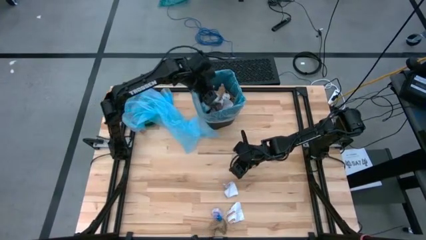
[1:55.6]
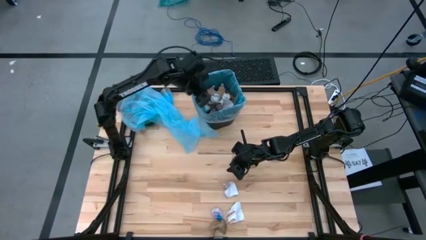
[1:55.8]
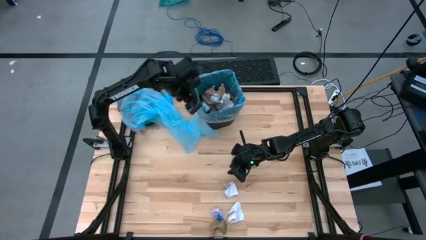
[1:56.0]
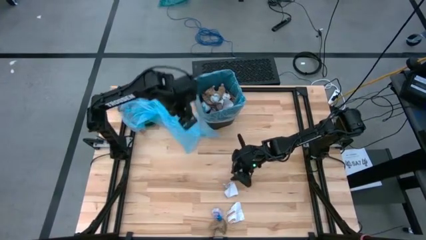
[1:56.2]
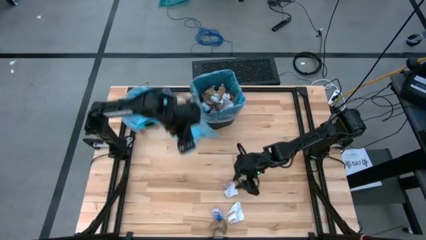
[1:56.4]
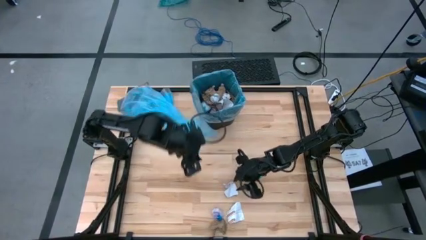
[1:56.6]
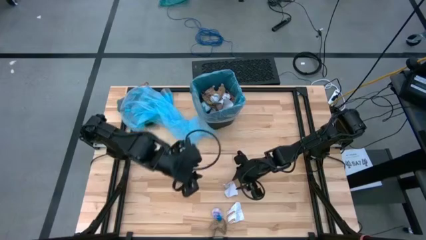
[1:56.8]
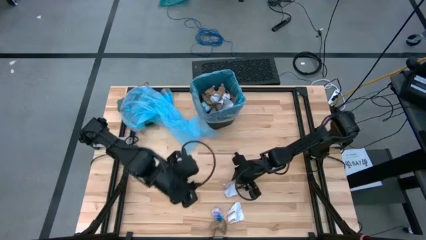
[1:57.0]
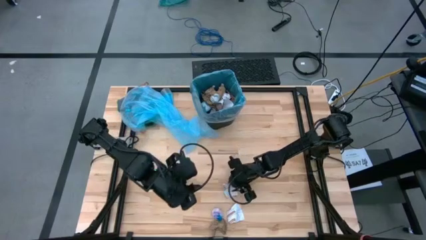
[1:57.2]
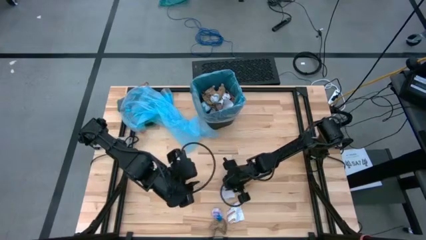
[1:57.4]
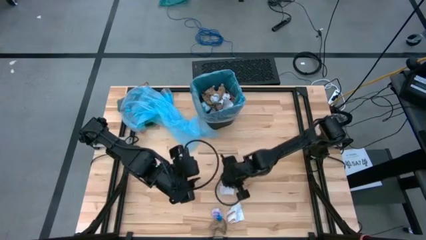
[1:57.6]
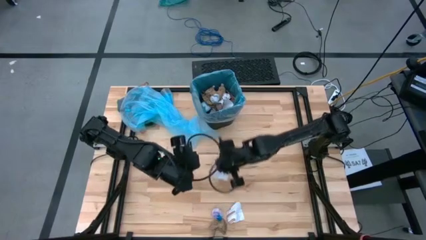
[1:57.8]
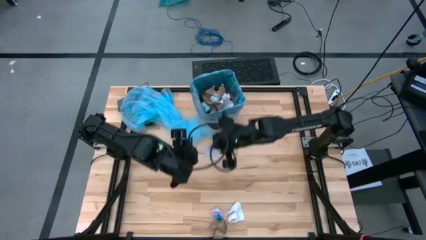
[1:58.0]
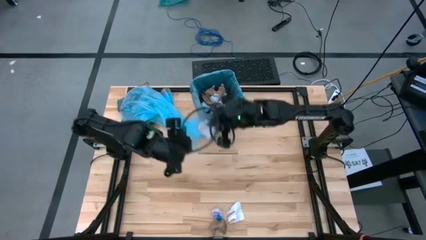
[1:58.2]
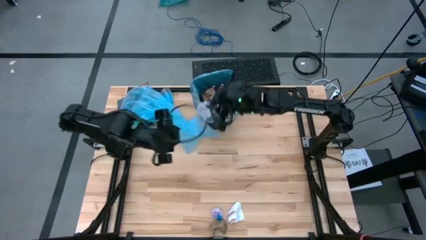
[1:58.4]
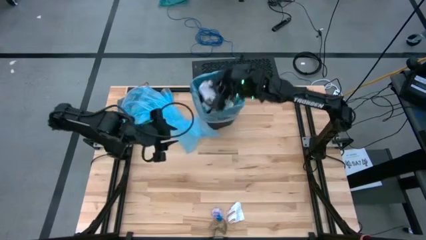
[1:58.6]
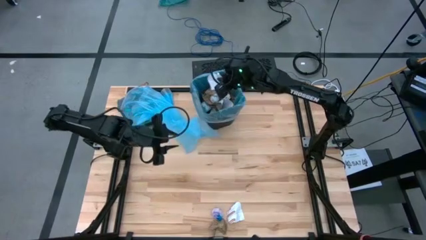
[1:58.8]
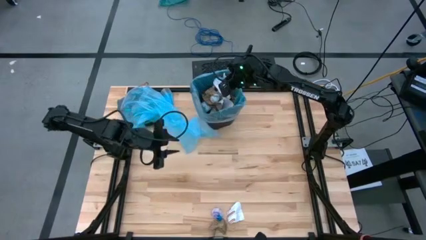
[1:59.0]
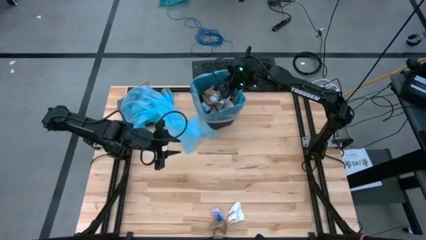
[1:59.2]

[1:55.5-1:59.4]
Task: place trash/remove bag and relplace
Put the white paper into the trash bin

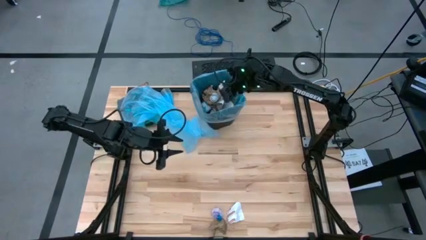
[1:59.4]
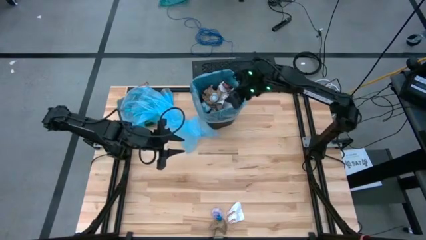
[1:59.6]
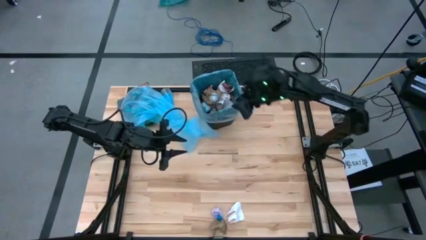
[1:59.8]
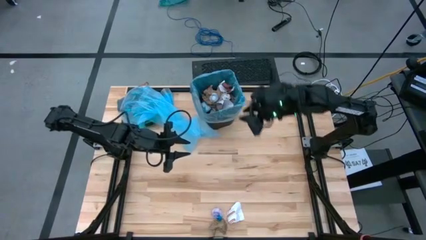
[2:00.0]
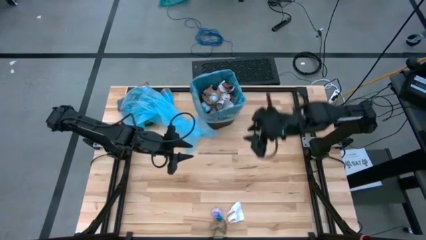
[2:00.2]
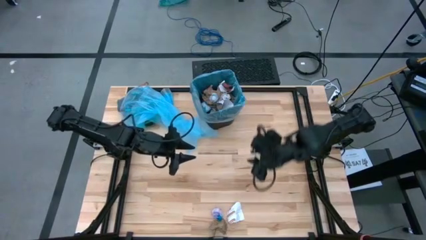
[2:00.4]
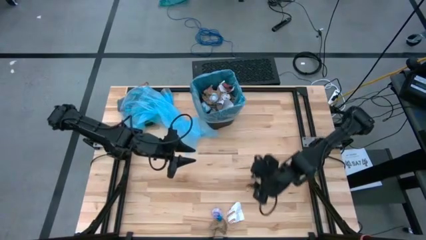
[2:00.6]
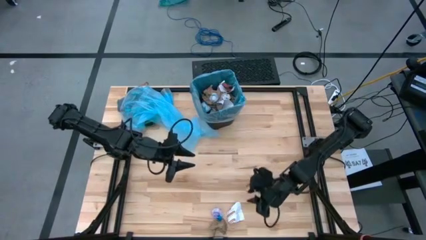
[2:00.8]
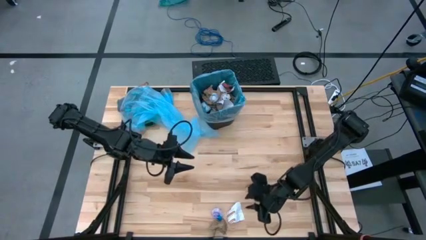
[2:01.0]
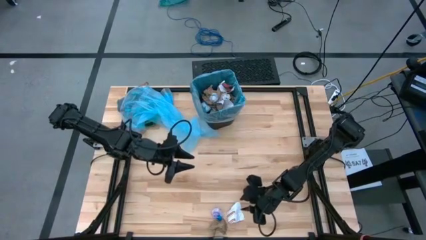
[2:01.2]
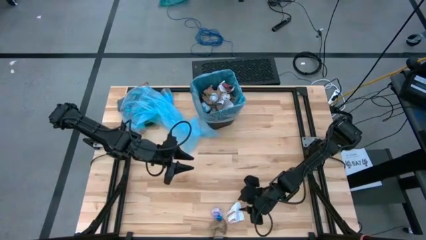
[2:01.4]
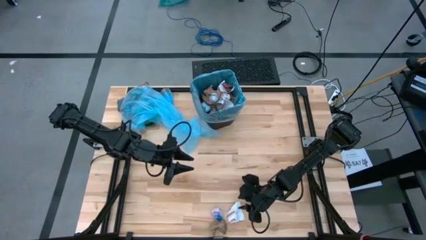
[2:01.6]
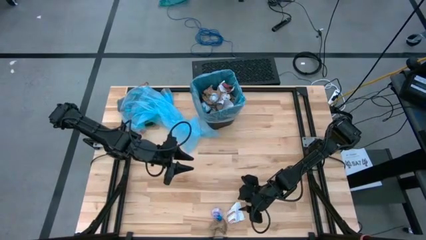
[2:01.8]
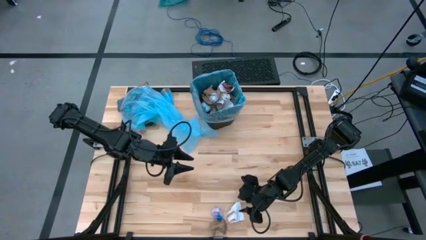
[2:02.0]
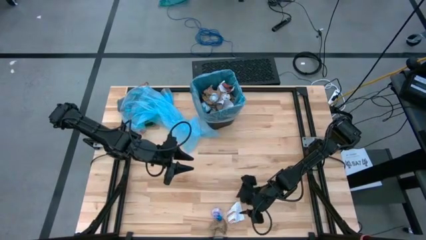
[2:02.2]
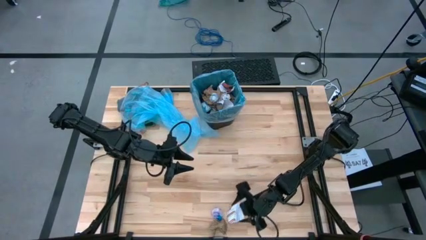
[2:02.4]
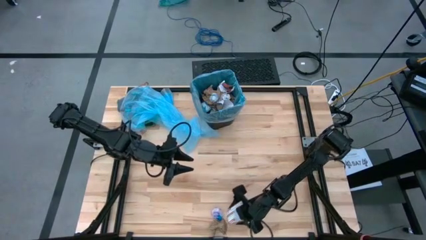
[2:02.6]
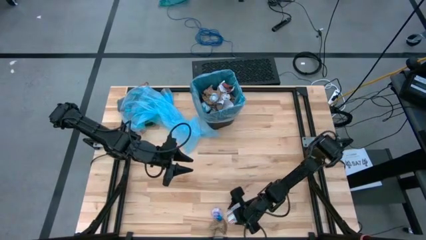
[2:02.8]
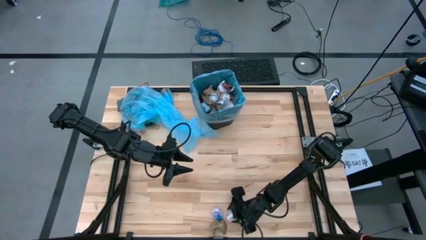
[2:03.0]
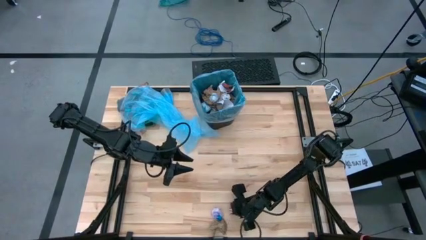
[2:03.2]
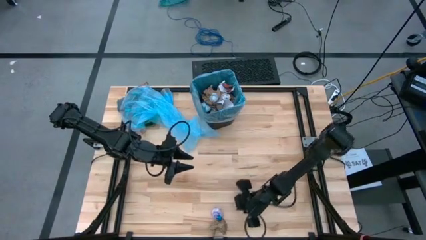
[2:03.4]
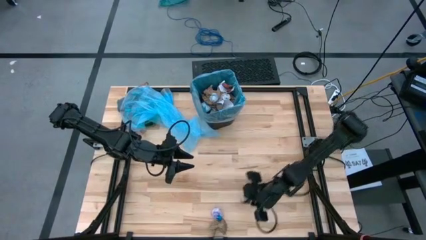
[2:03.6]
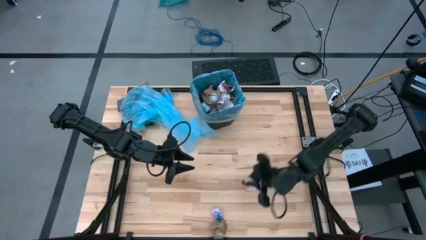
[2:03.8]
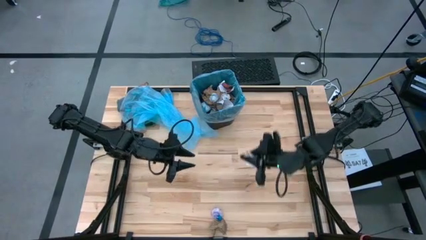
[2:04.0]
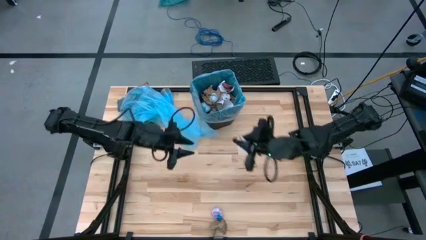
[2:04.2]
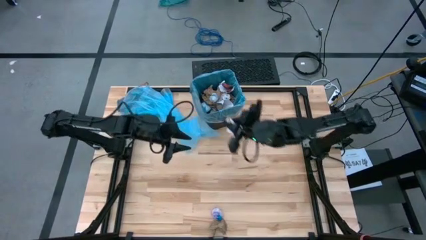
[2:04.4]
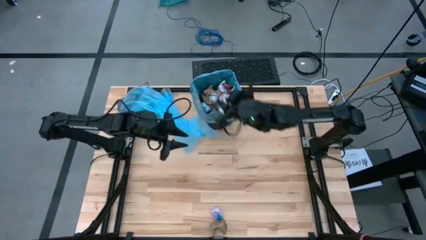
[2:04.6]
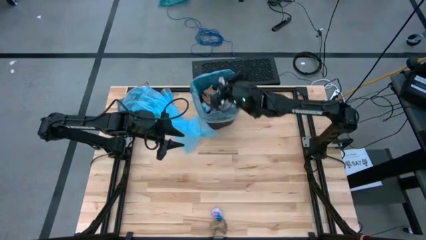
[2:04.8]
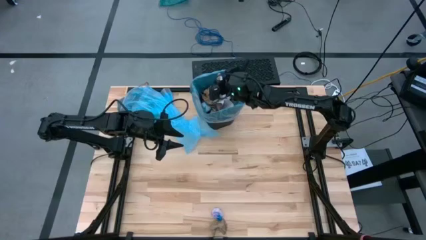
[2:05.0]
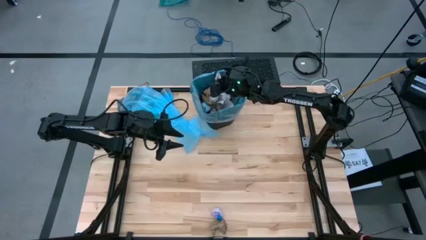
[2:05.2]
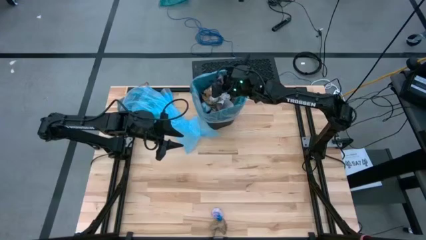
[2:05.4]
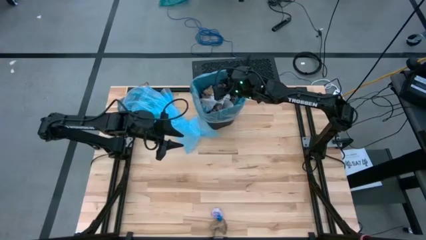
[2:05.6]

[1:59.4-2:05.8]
Put the white paper into the trash bin

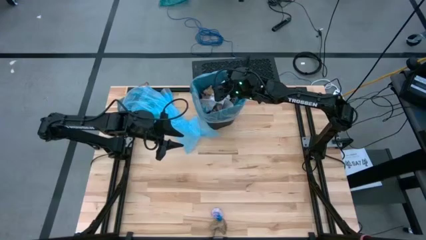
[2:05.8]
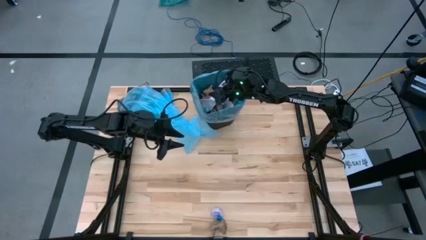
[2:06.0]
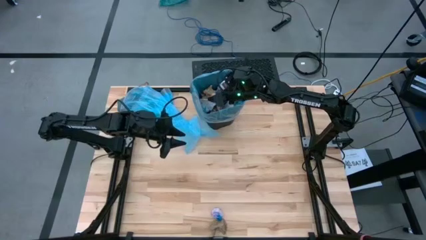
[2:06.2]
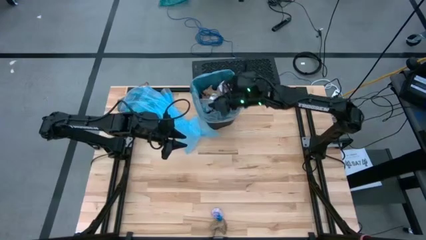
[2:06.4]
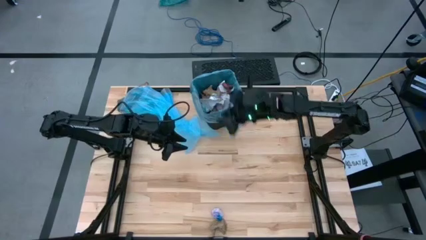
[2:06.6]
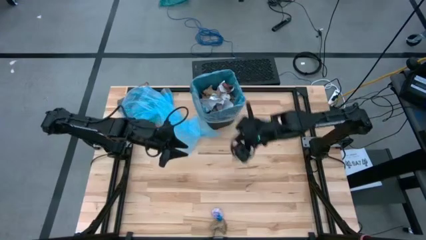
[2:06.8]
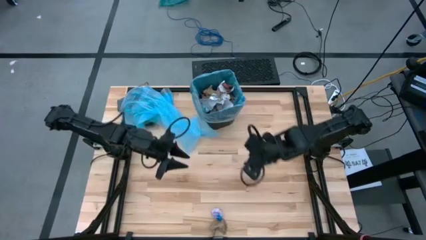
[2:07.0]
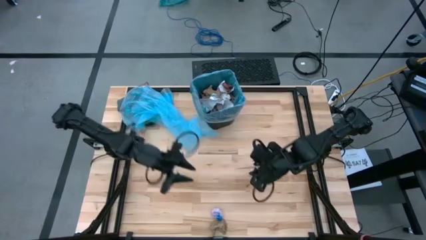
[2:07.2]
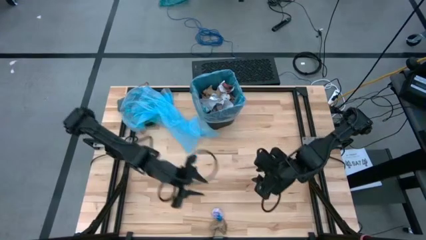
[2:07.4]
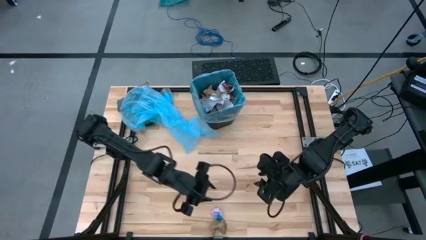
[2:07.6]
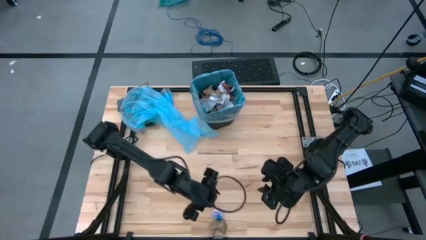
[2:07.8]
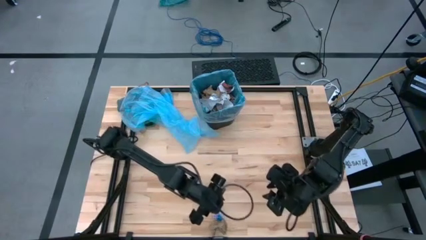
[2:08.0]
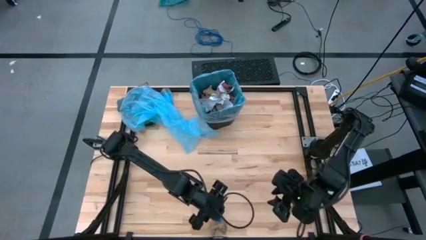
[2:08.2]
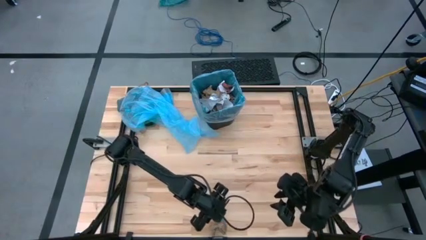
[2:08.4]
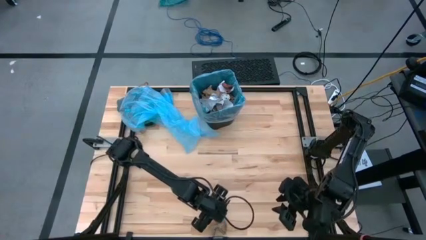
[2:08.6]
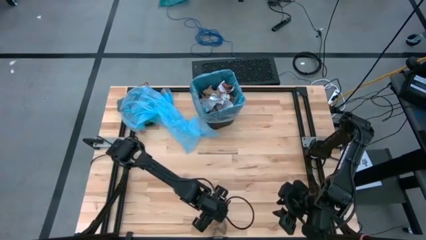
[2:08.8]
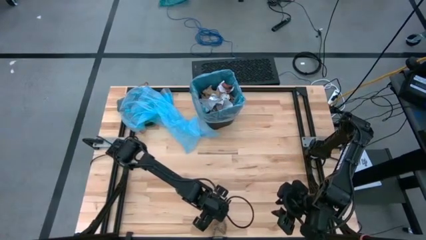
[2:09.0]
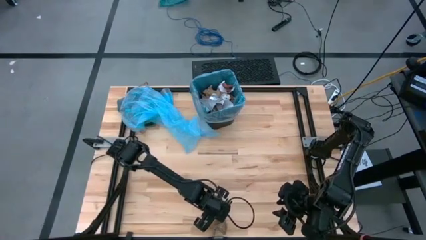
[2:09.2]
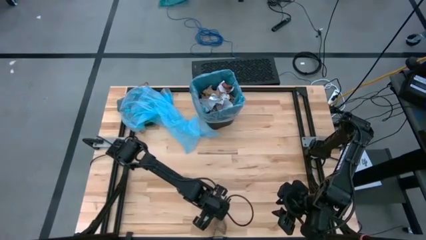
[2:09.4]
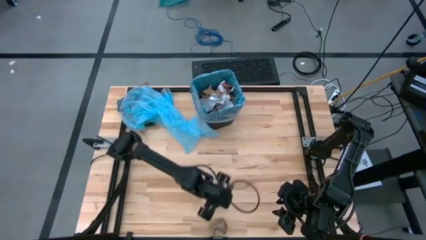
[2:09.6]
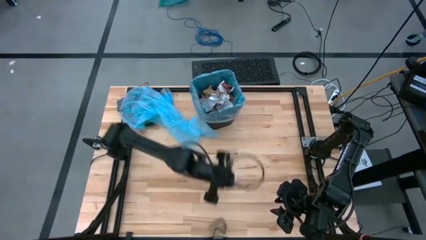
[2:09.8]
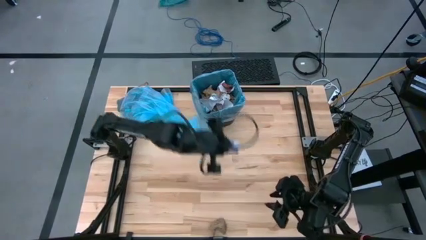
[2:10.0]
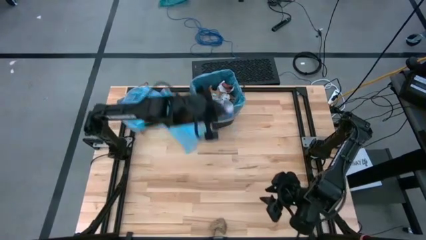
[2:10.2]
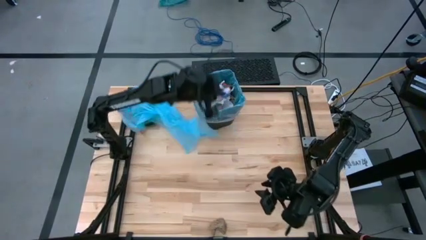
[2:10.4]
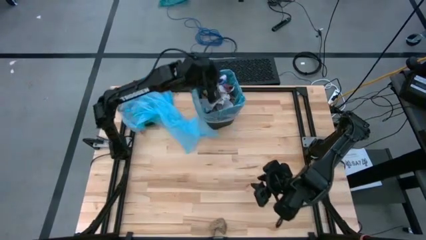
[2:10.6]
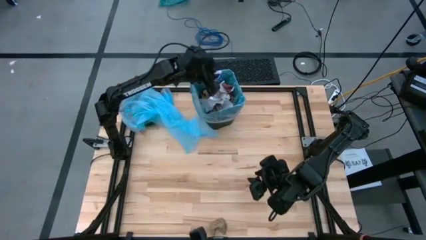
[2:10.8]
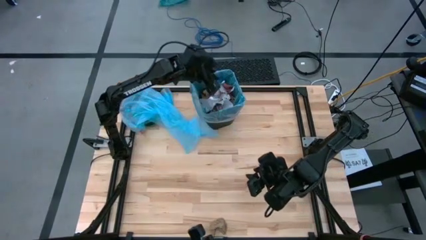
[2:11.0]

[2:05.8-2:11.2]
Put the pink crumpled plastic bag into the trash bin
